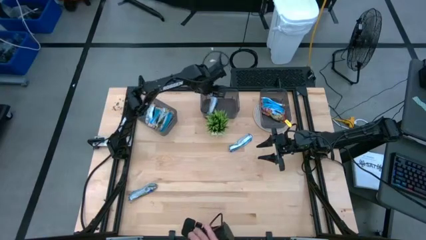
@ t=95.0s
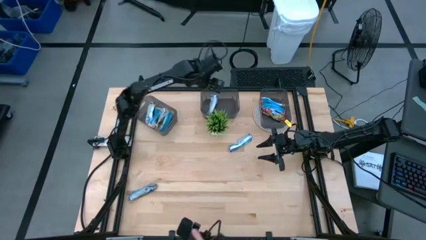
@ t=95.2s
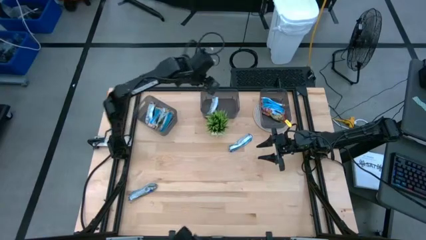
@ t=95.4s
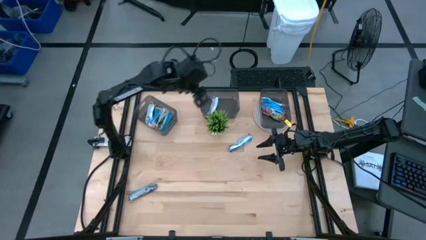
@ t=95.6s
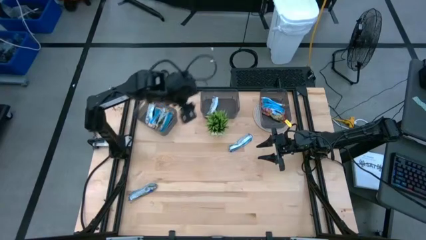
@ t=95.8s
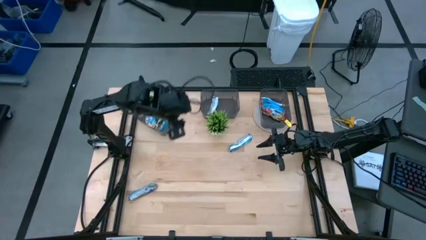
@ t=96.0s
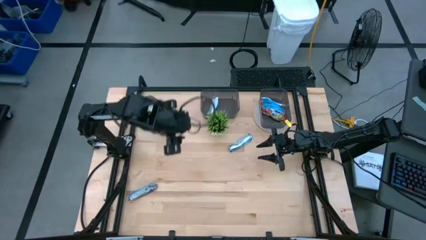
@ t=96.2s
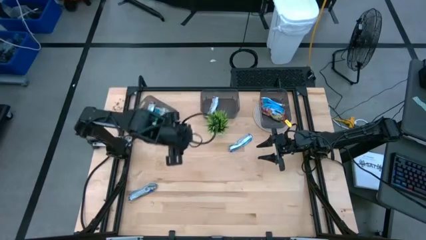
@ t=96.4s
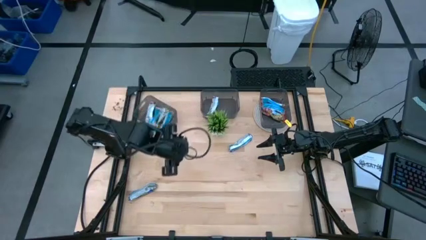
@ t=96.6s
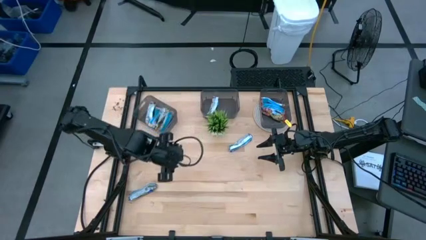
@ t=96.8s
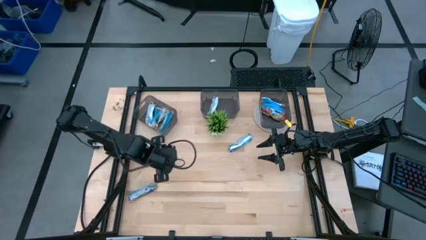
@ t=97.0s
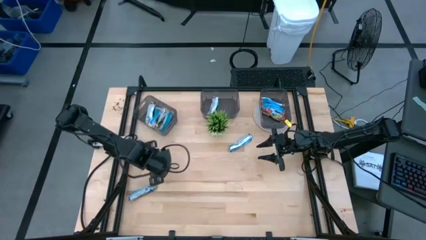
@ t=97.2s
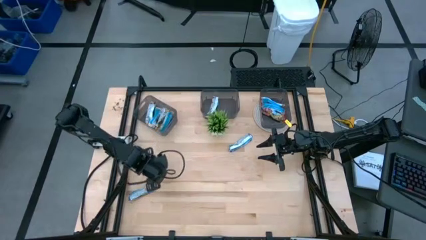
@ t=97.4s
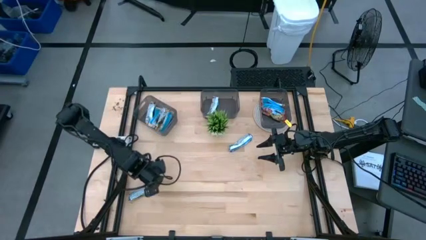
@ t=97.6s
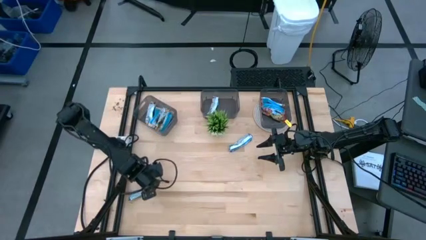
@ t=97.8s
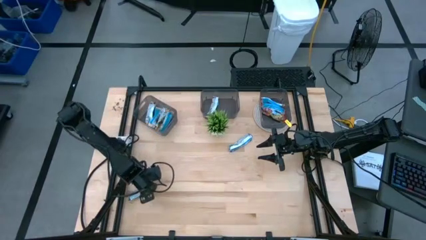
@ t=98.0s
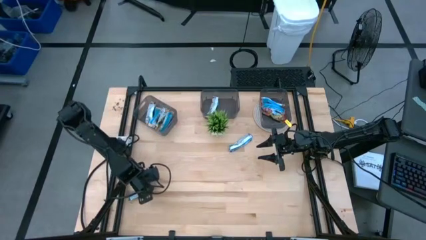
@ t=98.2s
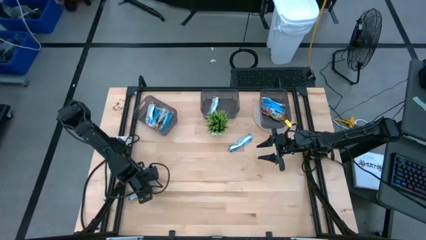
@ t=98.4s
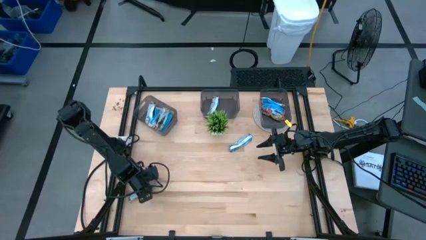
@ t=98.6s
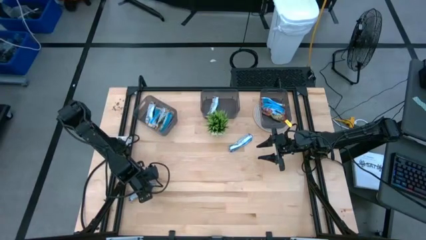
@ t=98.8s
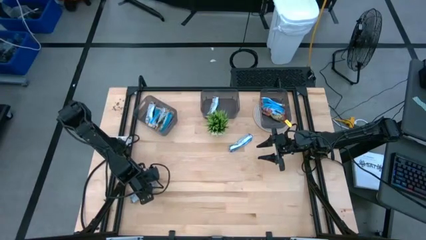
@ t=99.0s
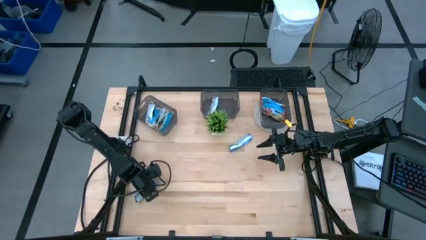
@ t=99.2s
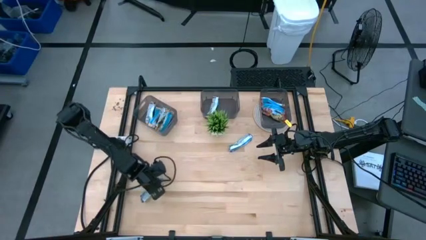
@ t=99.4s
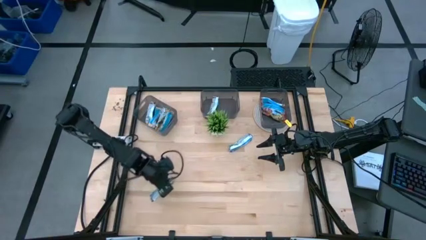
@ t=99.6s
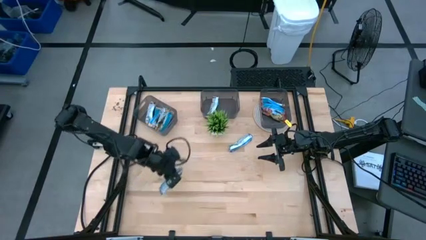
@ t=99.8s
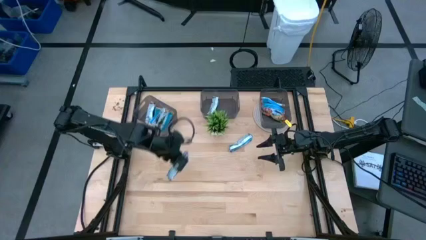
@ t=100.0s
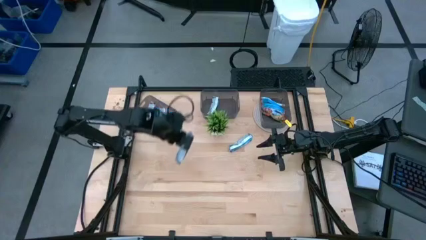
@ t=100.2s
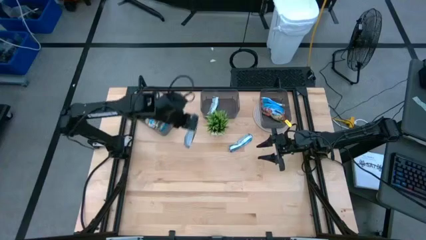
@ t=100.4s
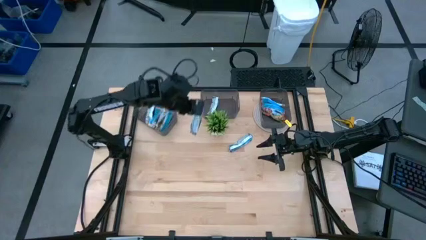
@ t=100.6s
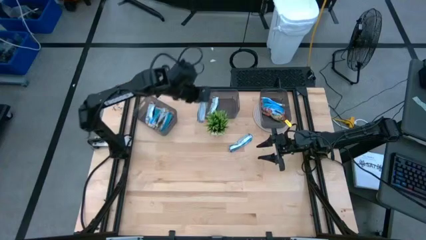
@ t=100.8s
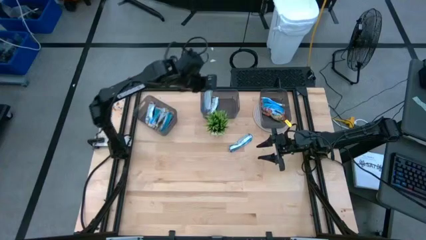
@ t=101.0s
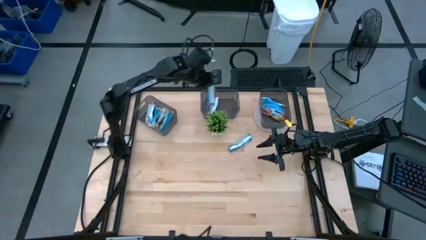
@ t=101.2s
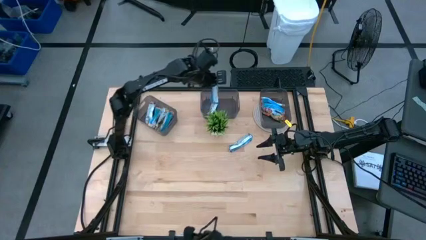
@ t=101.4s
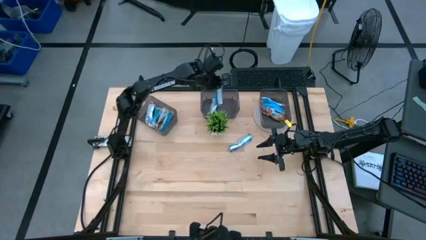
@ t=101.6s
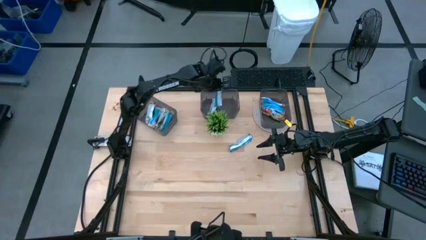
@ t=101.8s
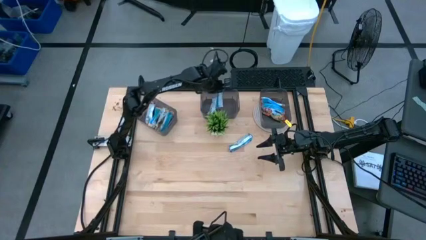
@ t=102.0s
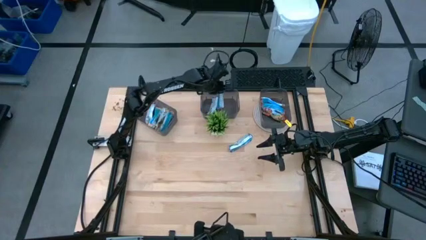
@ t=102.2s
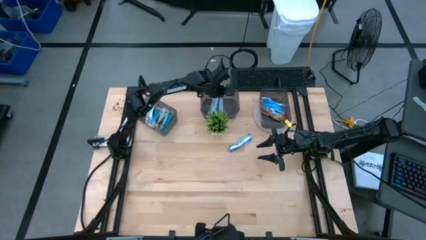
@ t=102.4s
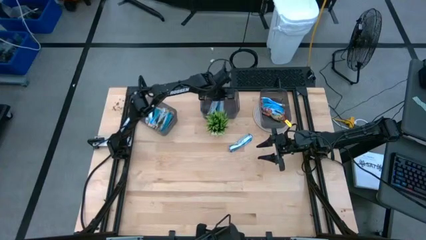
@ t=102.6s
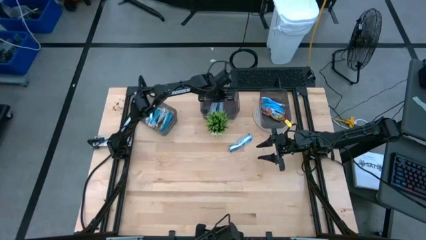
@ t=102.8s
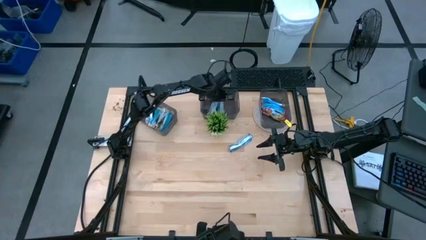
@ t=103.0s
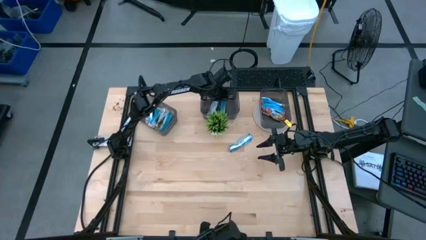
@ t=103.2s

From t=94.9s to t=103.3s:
Task: Pick and place Granola Bars by type
Put the blue granola bar into the middle black bin

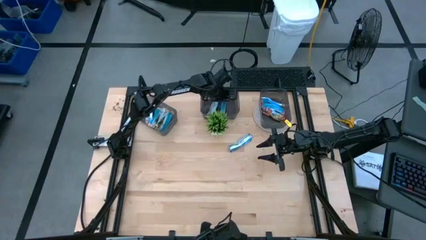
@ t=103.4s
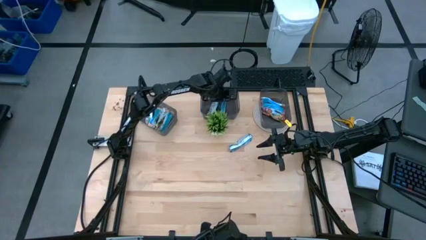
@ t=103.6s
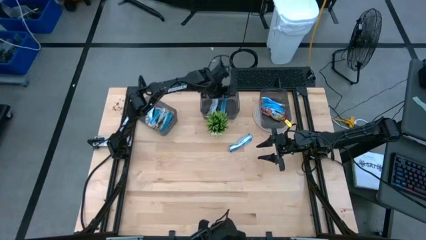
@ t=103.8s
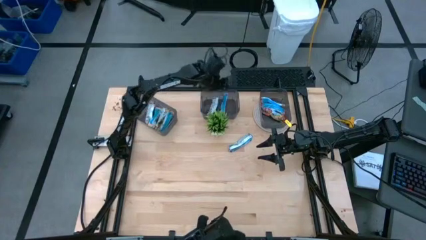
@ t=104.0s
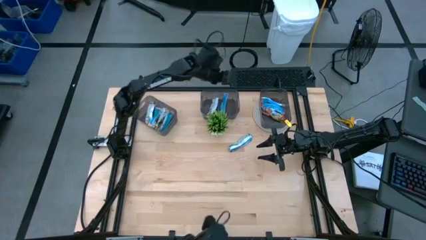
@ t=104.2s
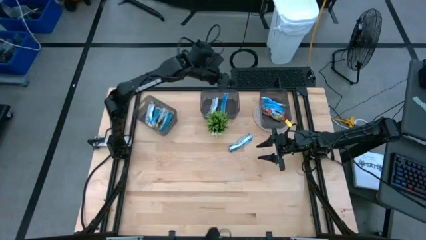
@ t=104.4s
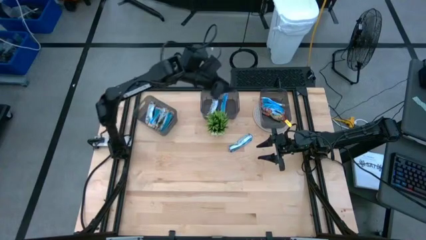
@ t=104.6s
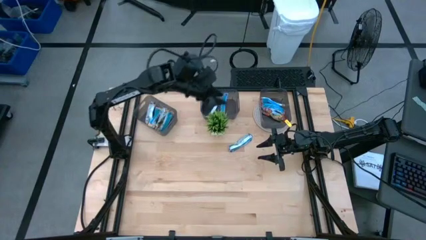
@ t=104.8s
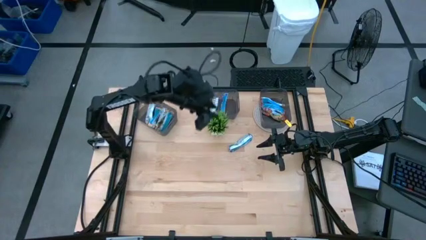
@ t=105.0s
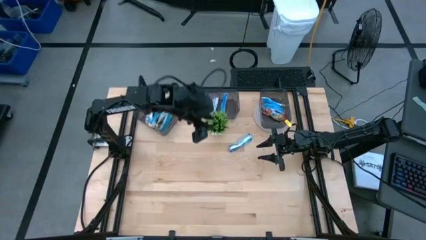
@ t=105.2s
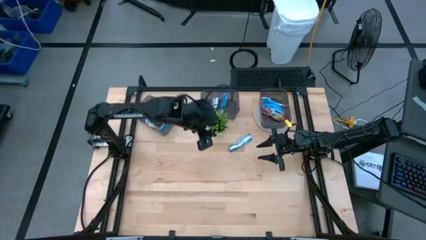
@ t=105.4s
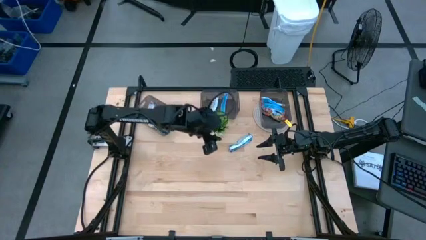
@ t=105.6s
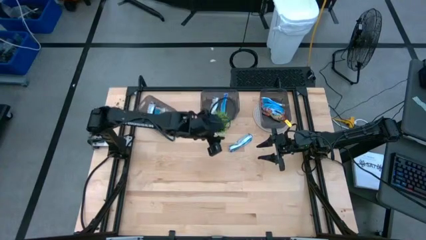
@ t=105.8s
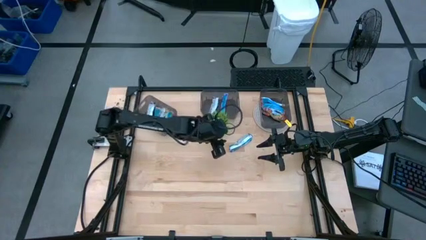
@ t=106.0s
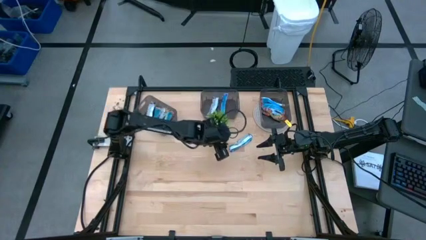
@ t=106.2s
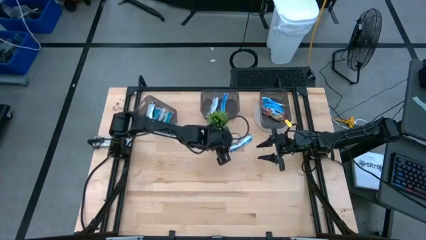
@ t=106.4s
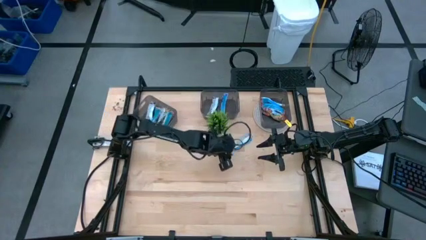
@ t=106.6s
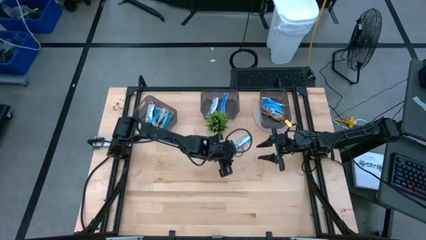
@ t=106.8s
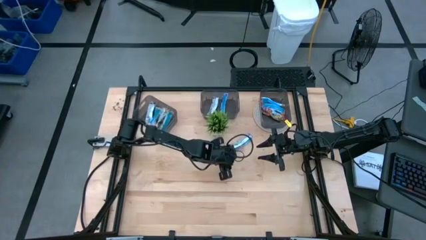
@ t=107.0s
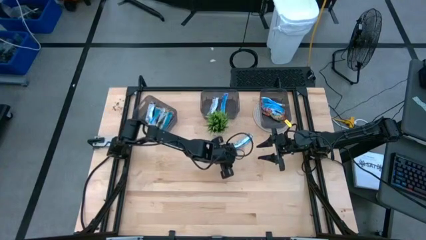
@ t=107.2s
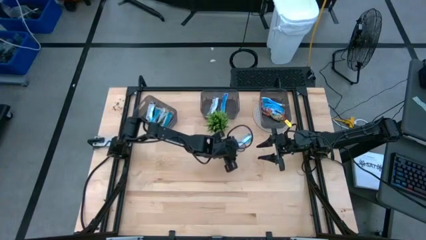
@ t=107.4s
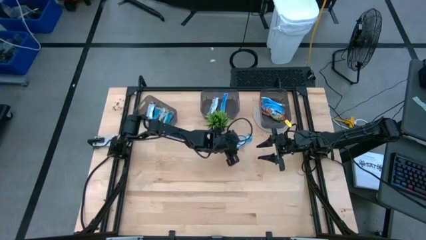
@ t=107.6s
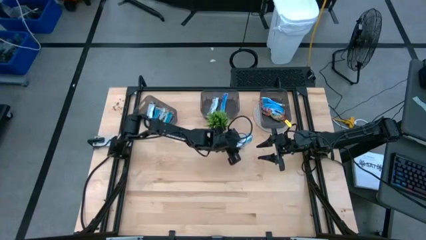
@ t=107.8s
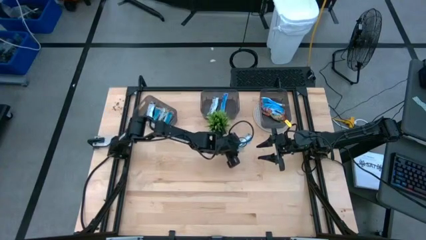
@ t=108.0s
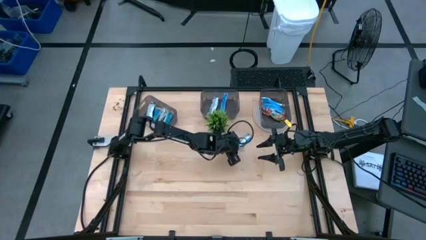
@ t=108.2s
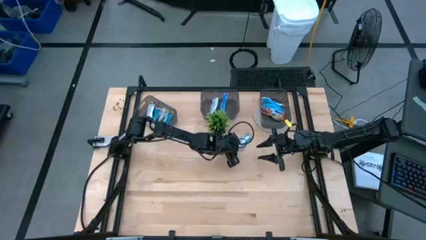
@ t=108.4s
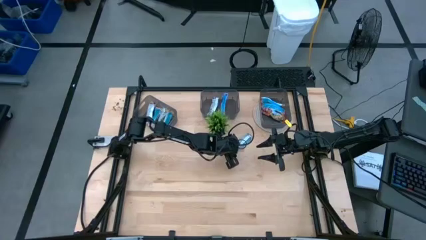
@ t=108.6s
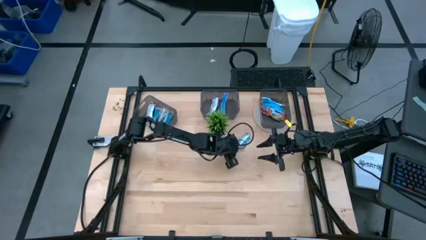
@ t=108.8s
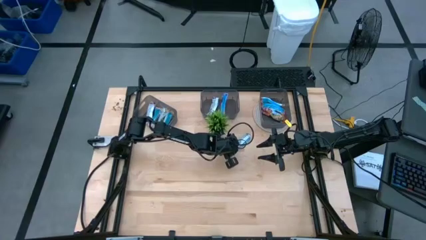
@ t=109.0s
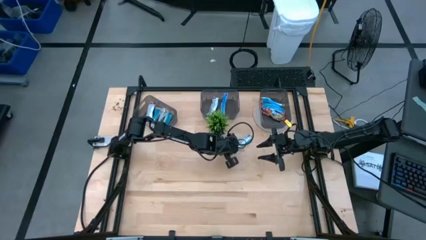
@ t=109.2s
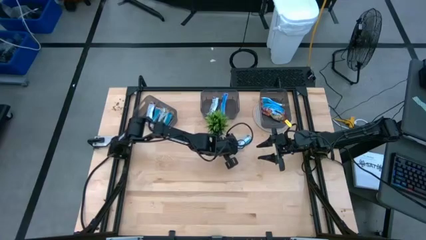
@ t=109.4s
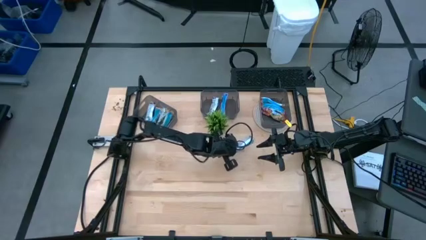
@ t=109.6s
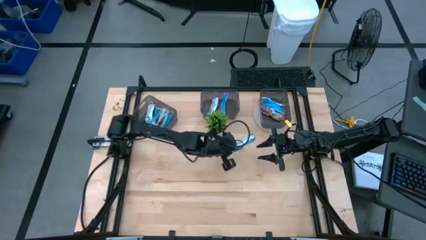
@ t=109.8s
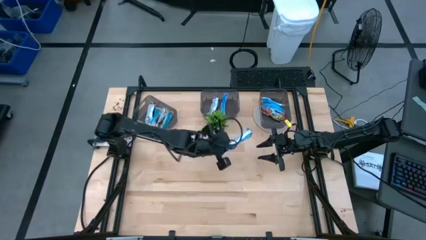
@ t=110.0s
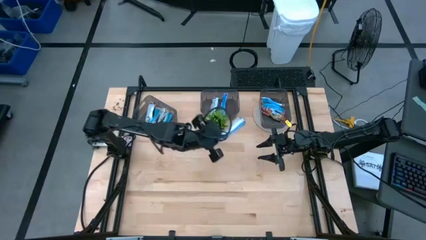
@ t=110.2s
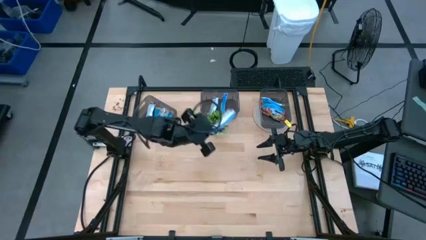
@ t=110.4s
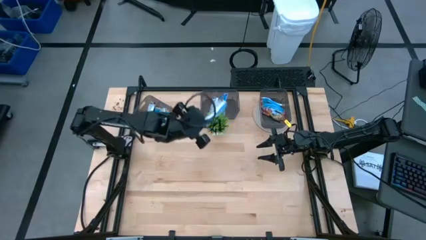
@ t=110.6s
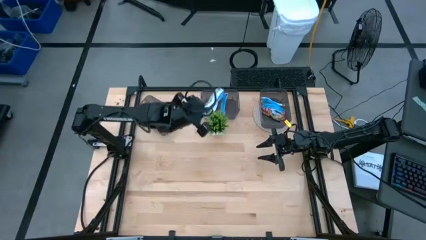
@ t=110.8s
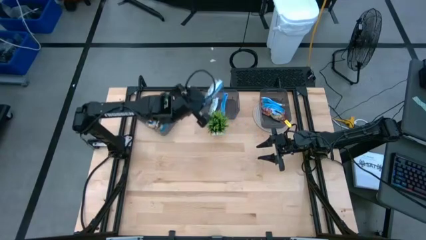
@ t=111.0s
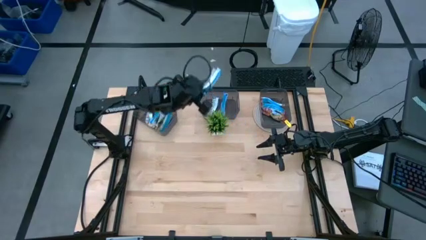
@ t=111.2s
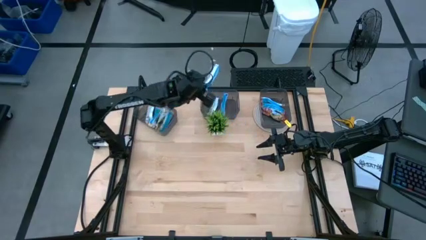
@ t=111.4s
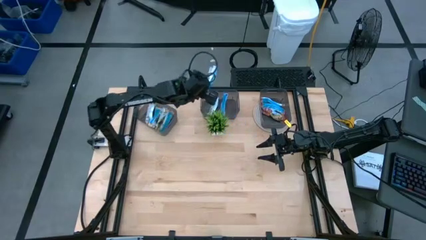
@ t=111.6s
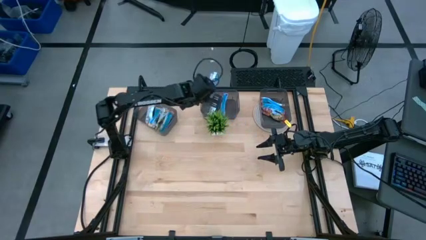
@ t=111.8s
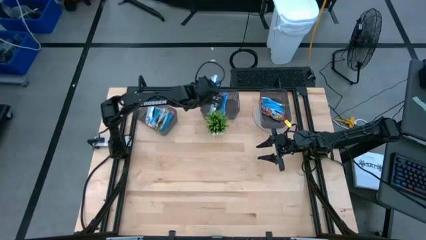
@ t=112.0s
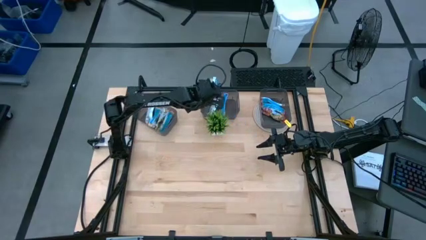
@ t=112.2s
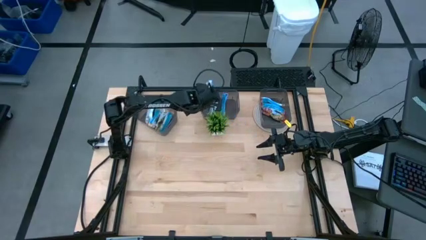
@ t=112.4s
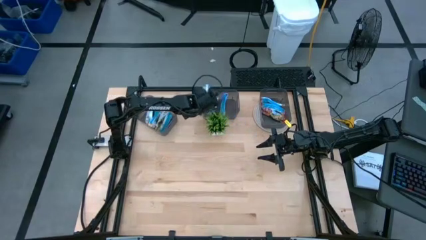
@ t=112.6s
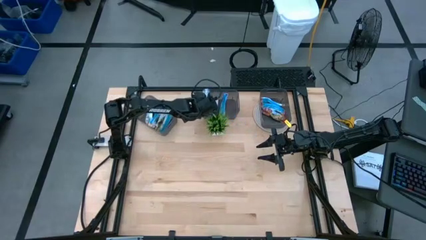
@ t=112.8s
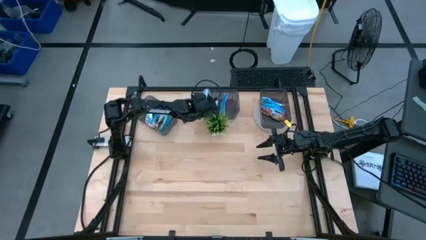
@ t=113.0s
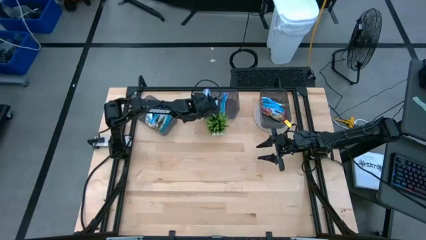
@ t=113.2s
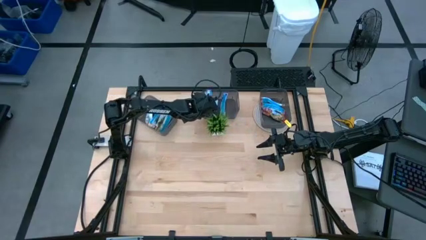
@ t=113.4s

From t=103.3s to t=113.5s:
Put the blue granola bar into the middle black bin
